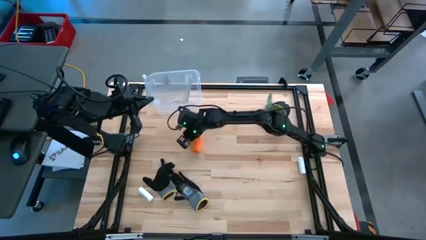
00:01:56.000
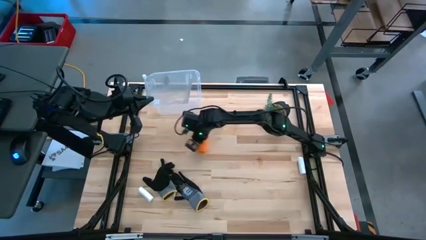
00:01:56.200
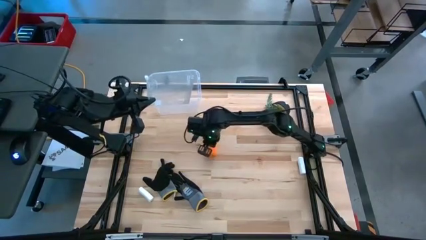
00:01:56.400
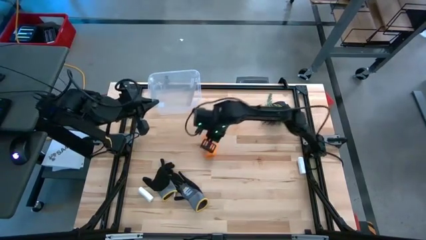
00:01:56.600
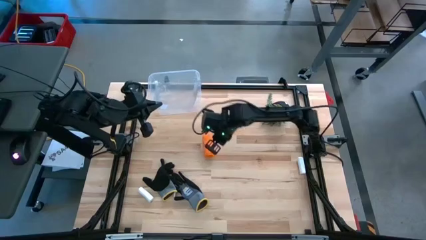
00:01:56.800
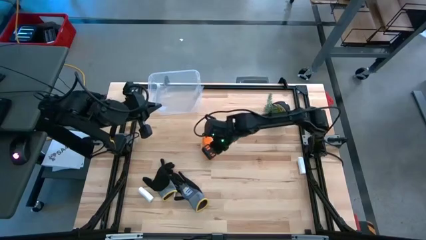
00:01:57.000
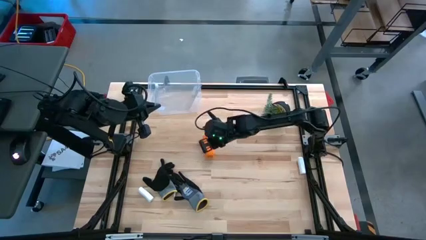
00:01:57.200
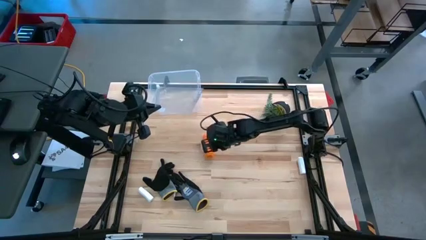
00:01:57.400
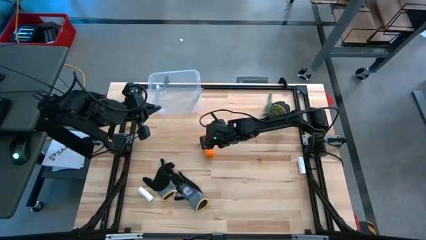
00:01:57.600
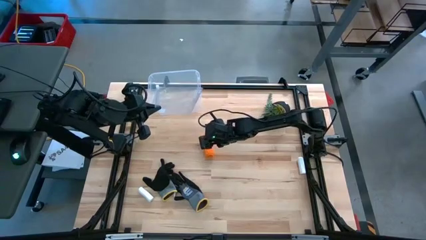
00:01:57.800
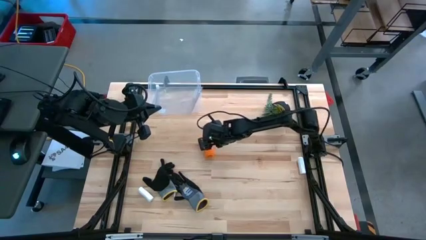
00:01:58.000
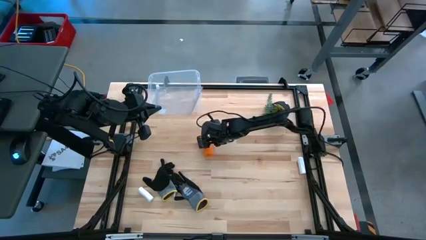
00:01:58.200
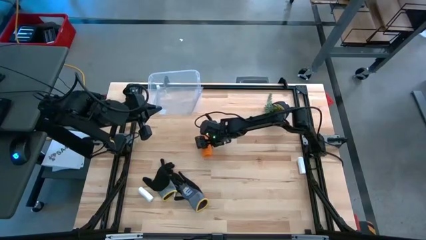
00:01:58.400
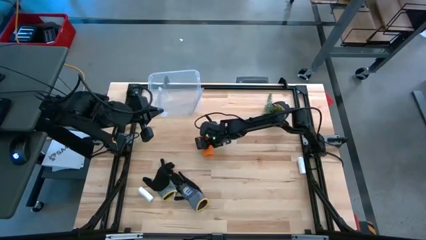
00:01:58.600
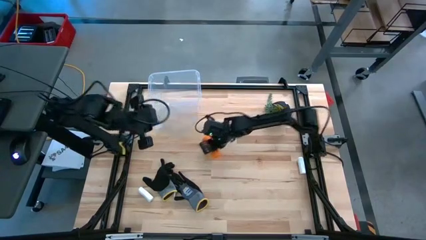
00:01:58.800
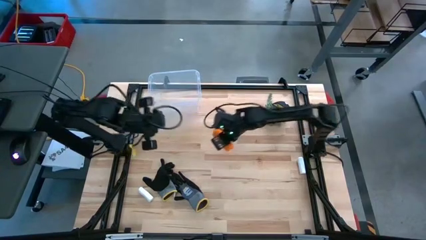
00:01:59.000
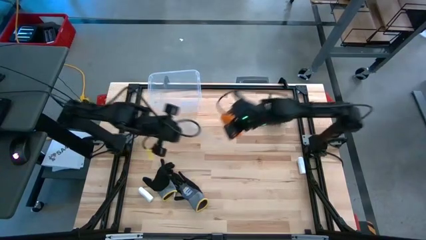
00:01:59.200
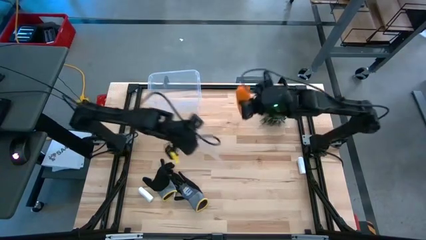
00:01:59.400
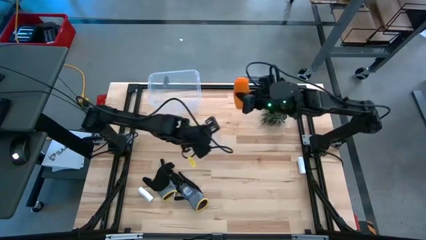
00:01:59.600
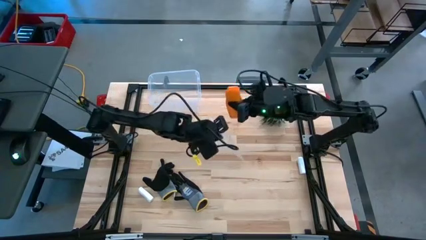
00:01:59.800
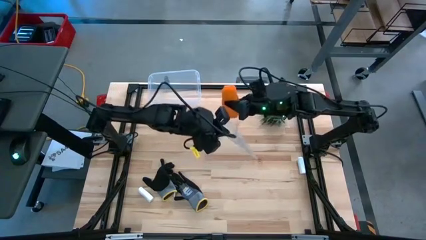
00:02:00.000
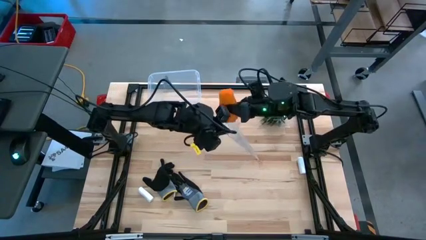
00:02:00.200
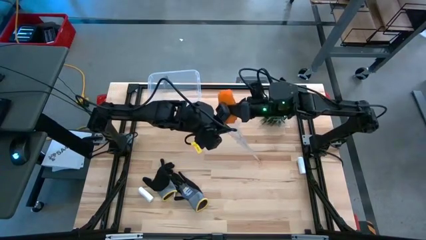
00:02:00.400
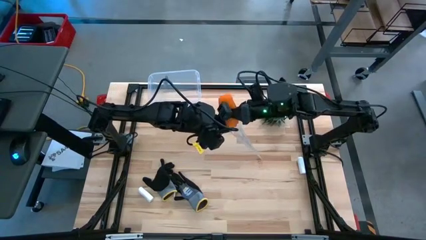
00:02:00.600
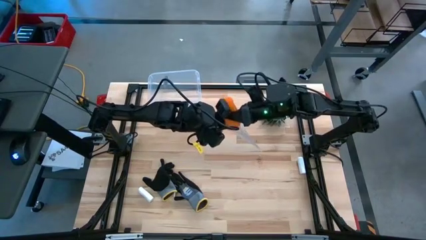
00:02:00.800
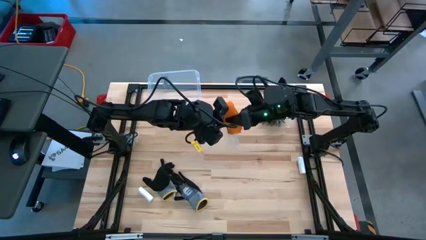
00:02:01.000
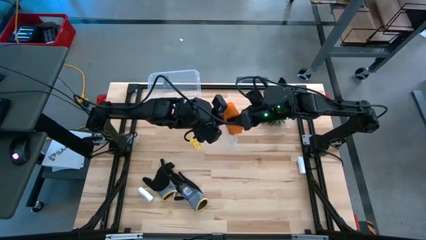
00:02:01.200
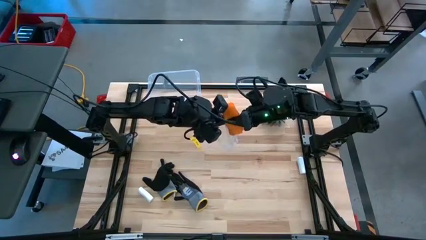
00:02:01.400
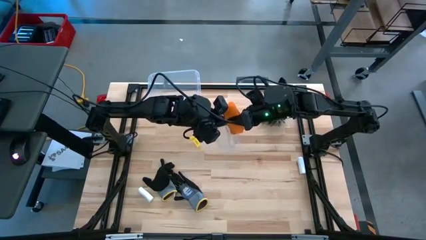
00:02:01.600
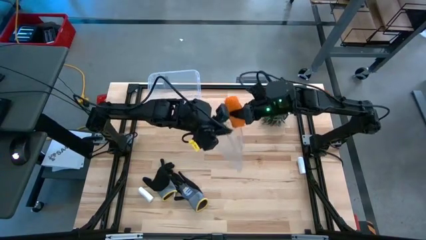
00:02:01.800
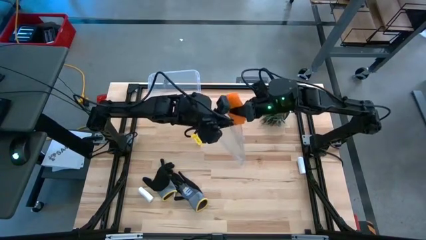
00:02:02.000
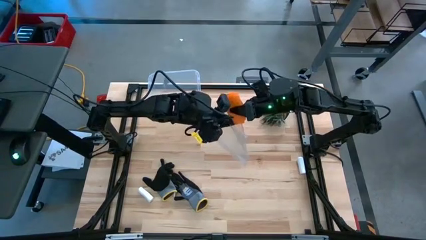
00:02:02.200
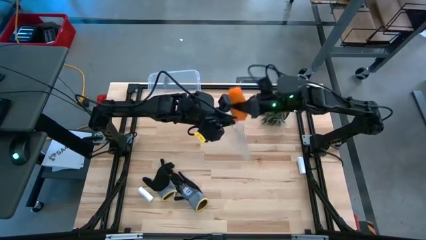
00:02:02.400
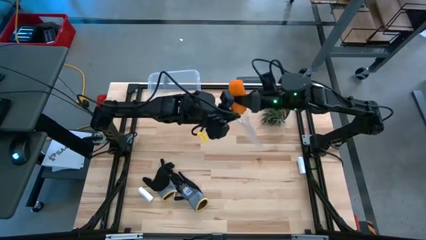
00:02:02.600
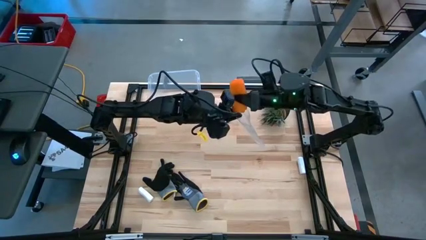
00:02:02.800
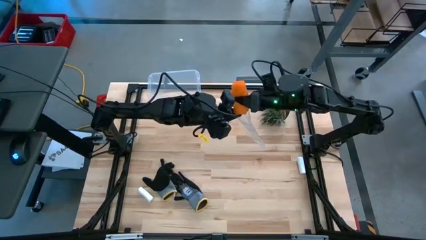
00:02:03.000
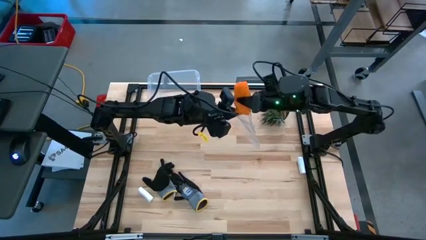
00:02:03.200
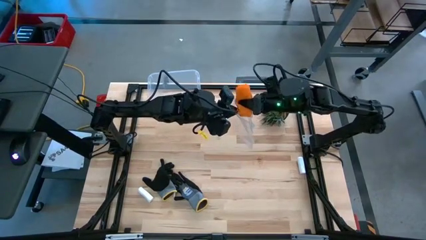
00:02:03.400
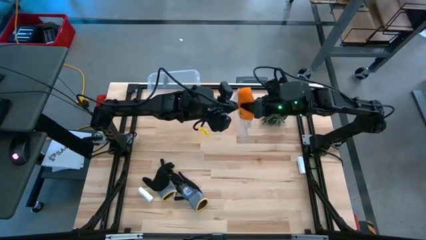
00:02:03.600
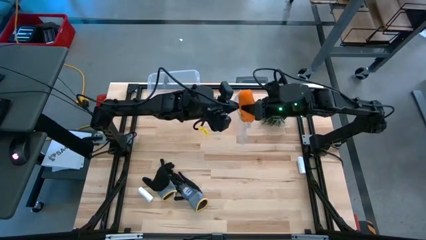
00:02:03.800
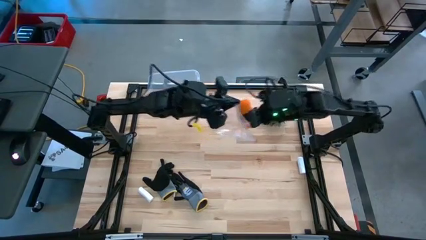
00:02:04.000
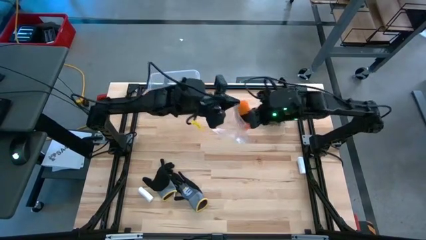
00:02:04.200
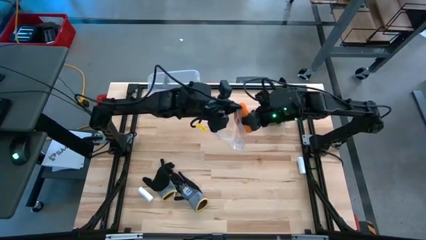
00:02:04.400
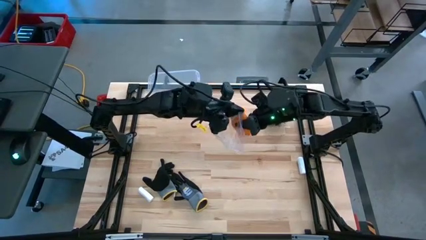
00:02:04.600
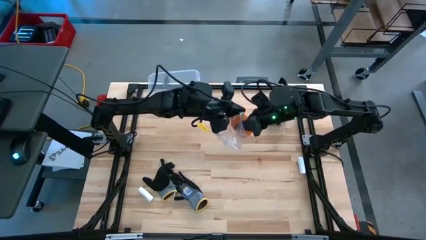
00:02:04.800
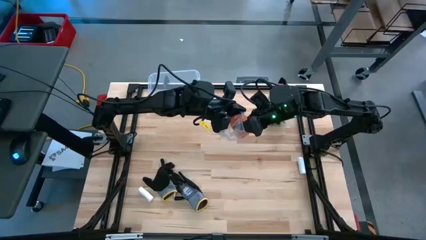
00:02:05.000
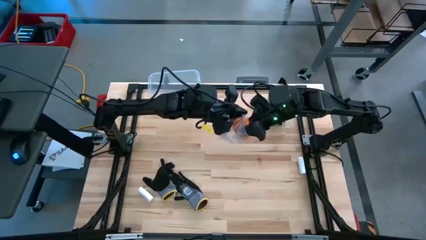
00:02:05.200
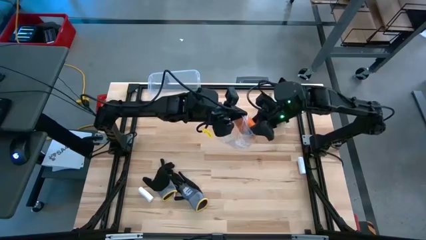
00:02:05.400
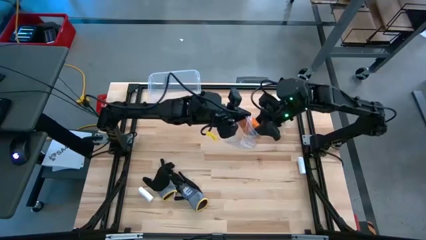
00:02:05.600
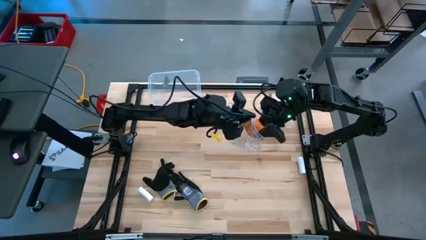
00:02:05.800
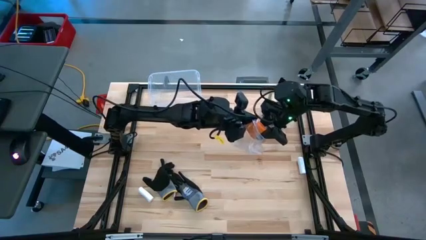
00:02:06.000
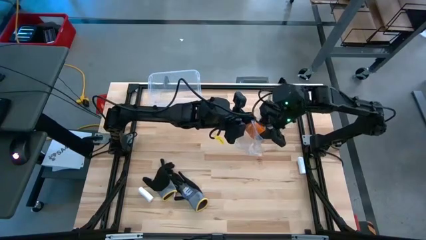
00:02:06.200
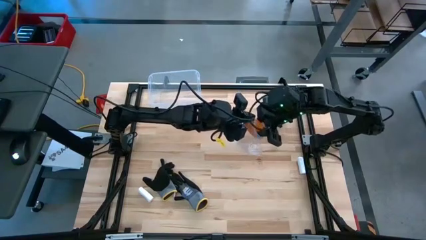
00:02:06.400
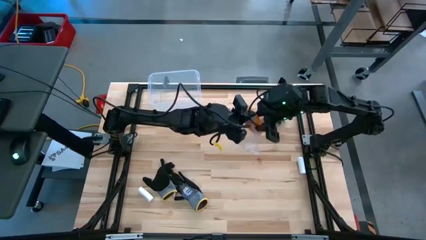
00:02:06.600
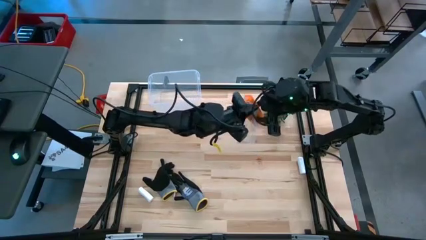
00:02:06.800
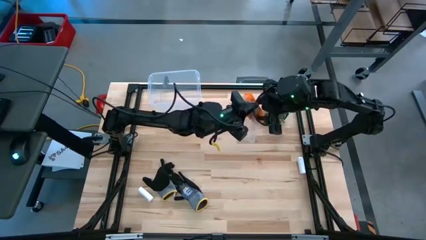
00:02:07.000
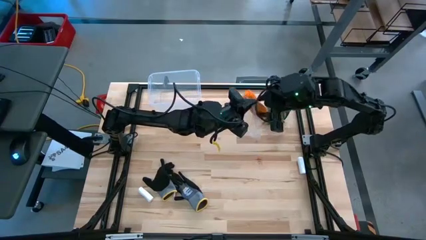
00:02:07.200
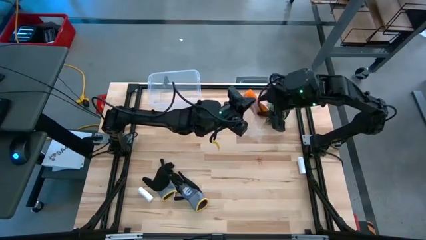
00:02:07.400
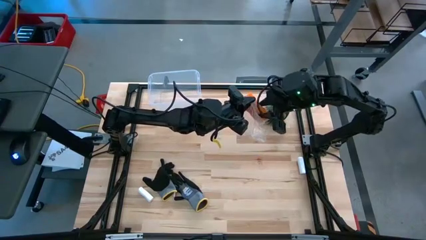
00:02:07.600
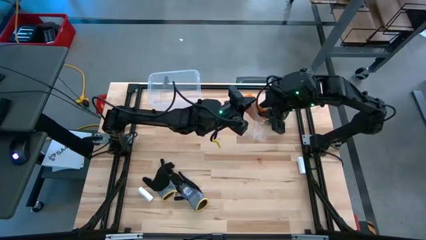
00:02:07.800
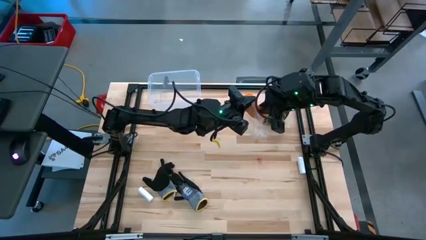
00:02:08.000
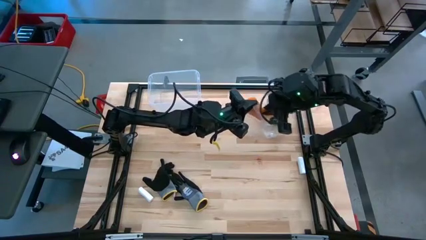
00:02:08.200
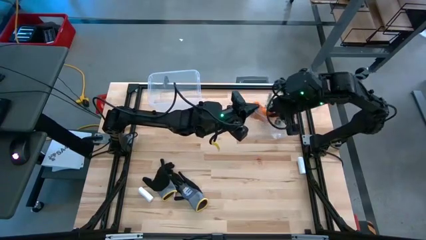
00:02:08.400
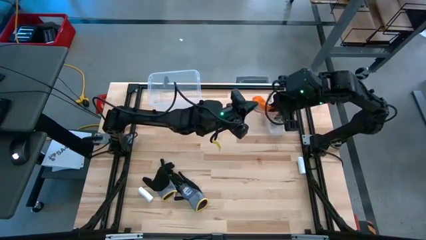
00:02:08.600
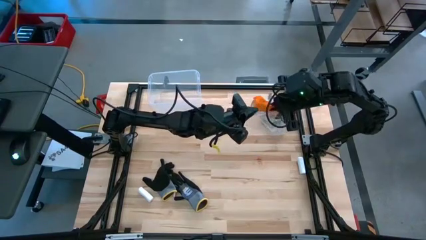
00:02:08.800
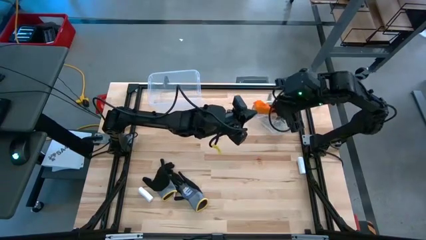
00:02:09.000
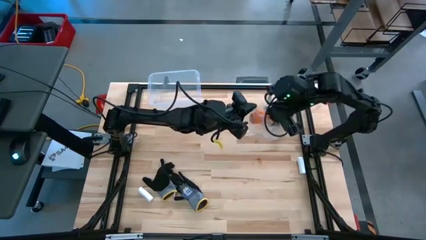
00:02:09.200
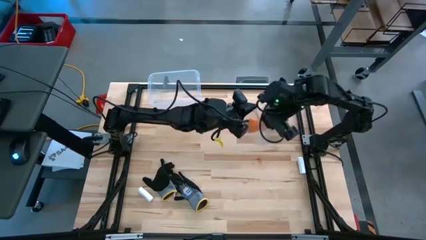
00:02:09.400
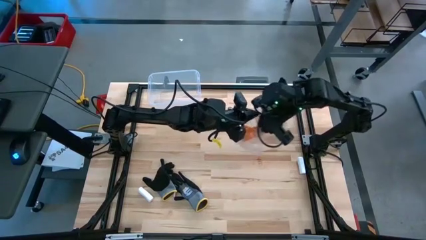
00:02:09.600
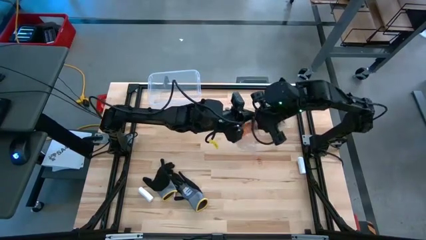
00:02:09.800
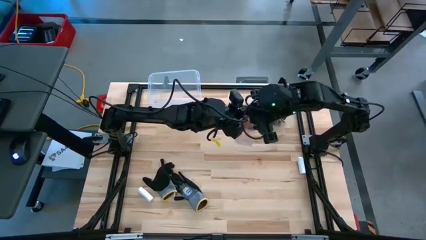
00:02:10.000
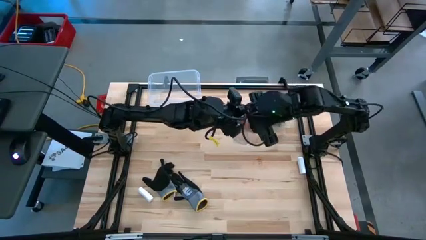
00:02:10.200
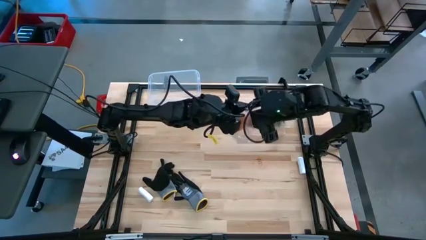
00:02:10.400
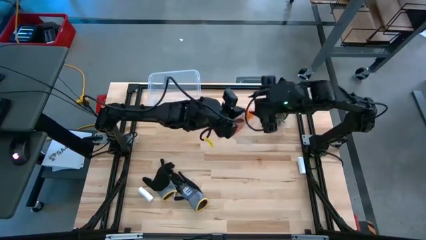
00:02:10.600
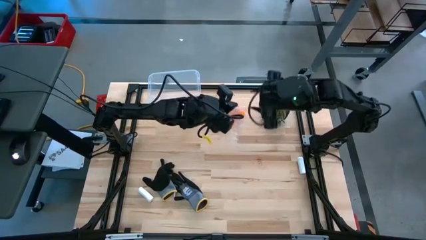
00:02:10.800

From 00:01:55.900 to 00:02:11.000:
Task: Roll bandage
Put the rolled orange bandage into the transparent zip bag

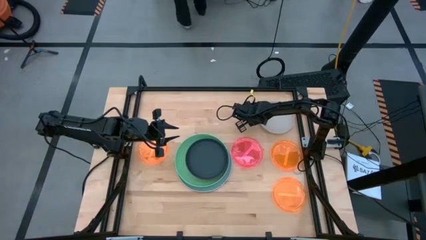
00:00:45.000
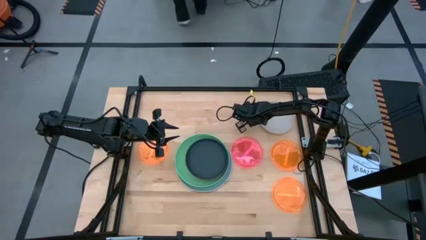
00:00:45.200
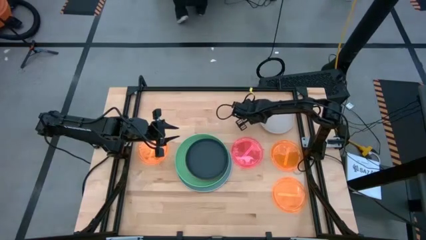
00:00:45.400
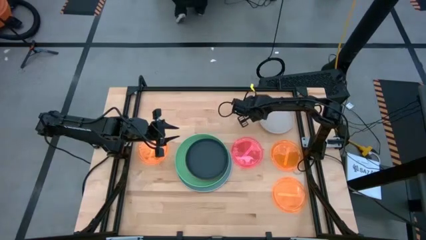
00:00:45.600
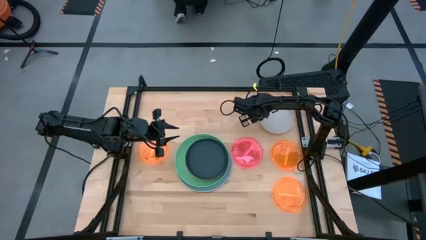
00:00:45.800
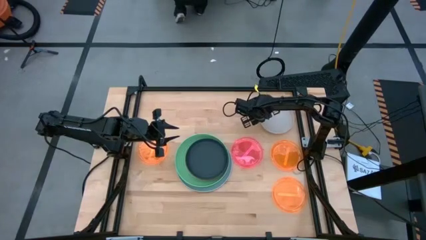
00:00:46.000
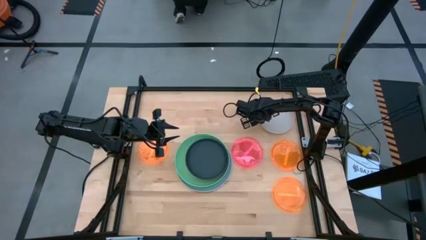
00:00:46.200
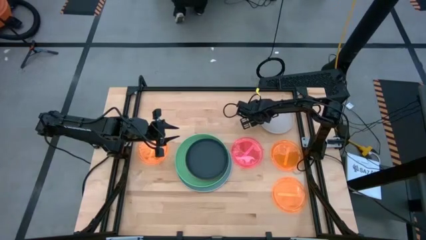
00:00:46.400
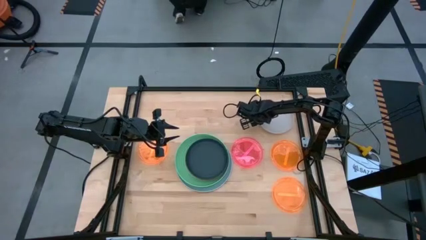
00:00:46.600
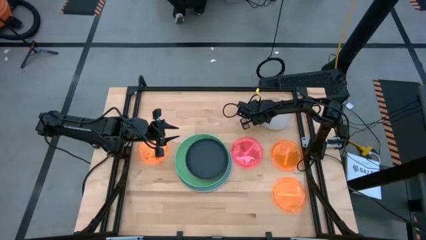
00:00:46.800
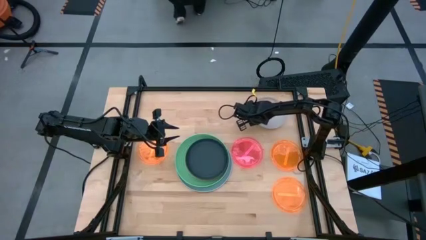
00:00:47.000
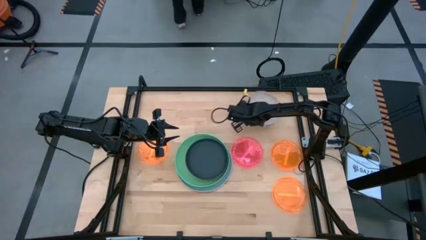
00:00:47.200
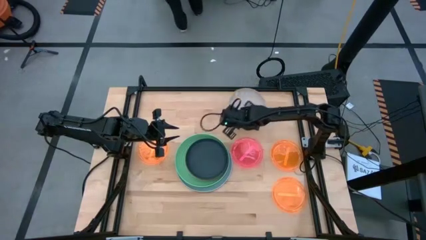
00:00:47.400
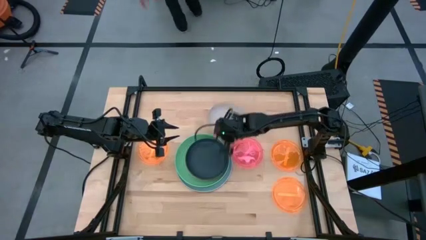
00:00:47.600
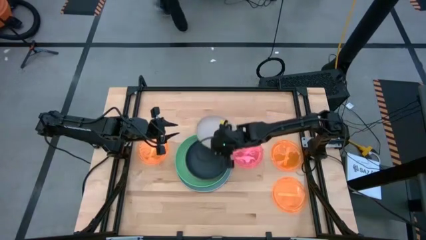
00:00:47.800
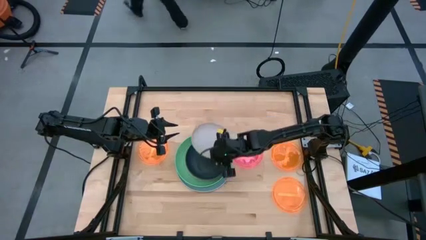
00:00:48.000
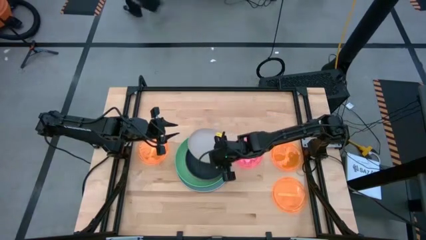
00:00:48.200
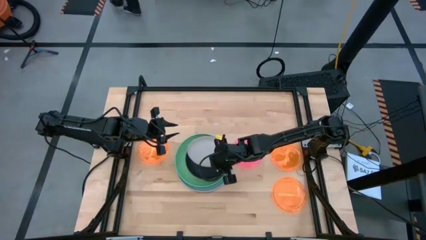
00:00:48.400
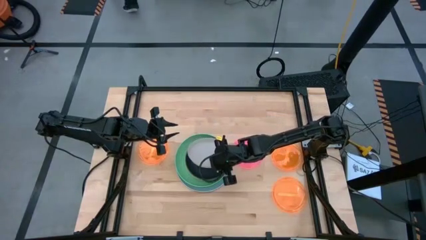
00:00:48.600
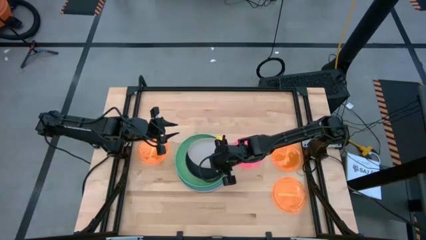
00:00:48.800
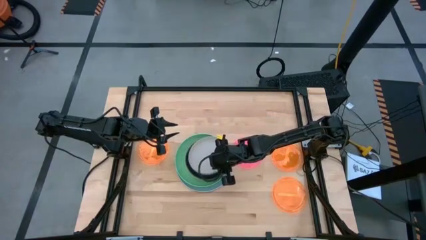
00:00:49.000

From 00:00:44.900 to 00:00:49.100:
Task: Stack plastic plates
Stack the white plate on top of the dark blue plate
